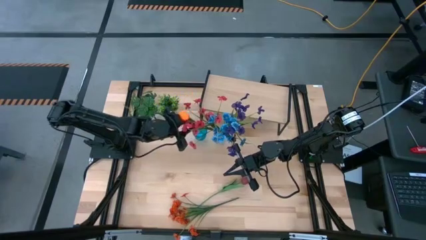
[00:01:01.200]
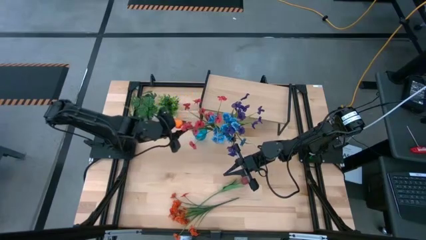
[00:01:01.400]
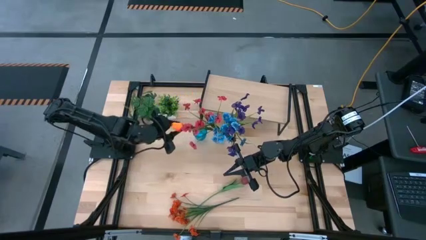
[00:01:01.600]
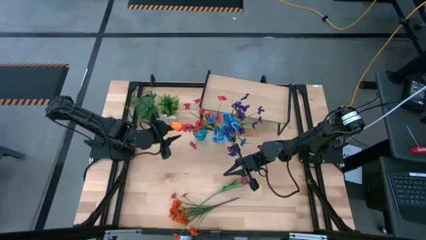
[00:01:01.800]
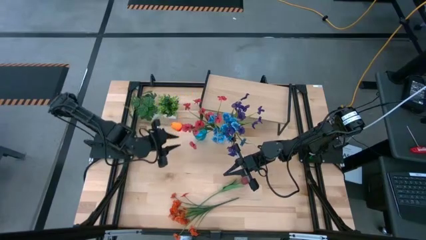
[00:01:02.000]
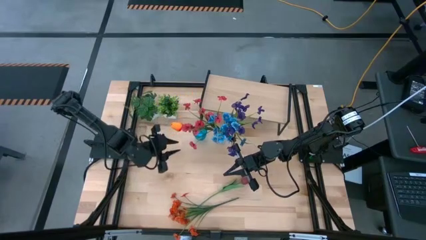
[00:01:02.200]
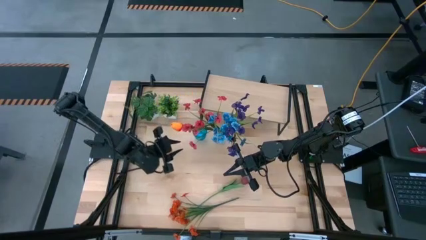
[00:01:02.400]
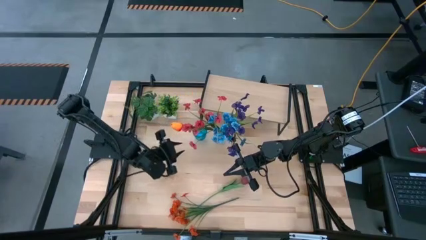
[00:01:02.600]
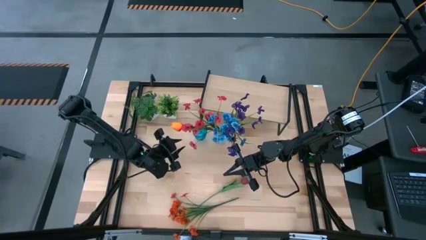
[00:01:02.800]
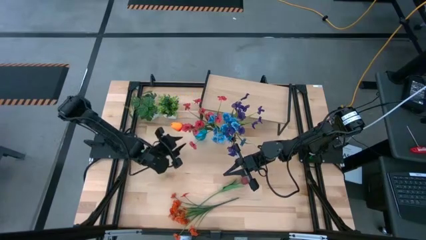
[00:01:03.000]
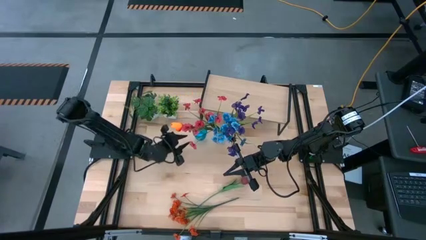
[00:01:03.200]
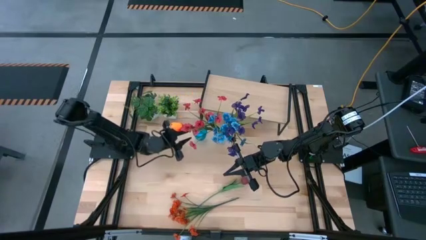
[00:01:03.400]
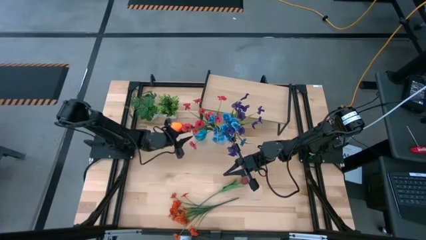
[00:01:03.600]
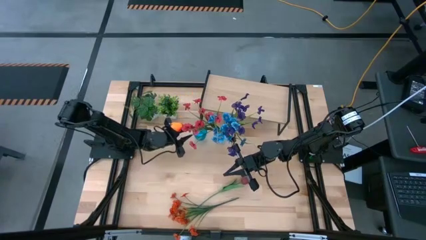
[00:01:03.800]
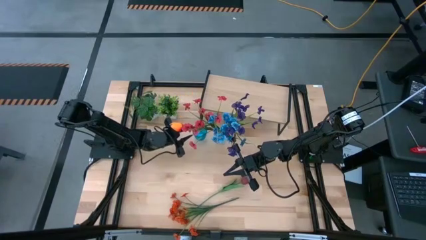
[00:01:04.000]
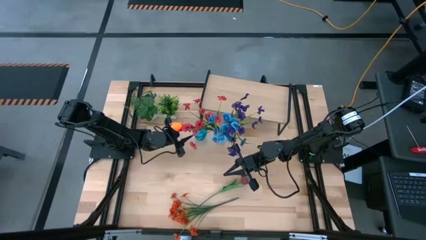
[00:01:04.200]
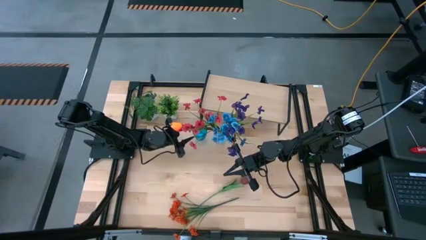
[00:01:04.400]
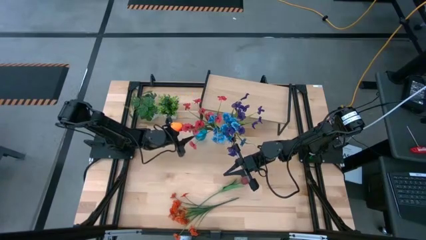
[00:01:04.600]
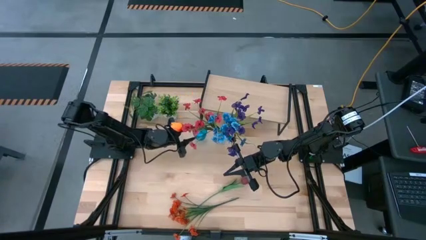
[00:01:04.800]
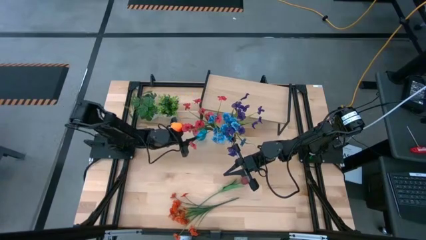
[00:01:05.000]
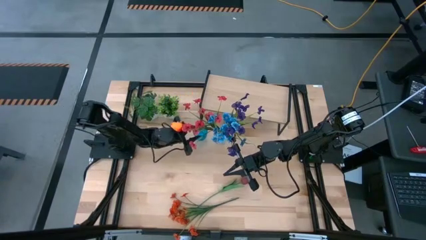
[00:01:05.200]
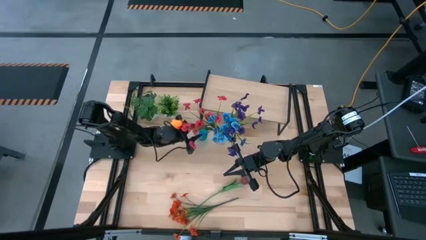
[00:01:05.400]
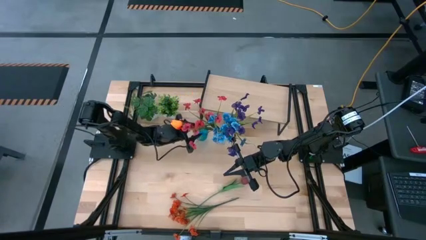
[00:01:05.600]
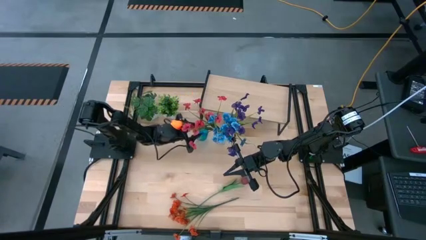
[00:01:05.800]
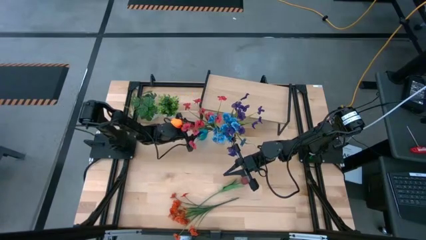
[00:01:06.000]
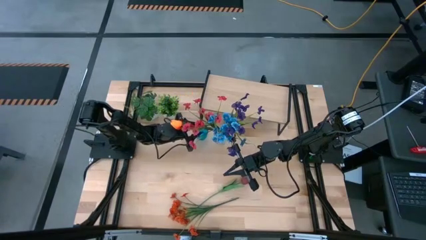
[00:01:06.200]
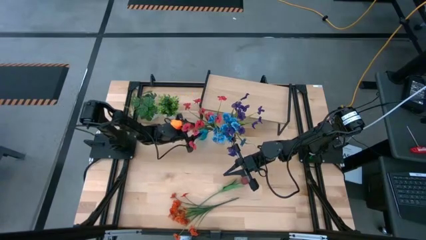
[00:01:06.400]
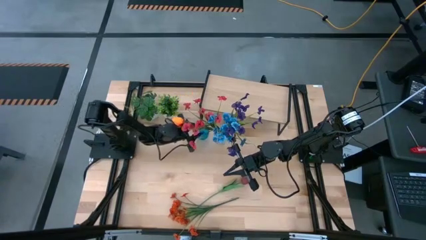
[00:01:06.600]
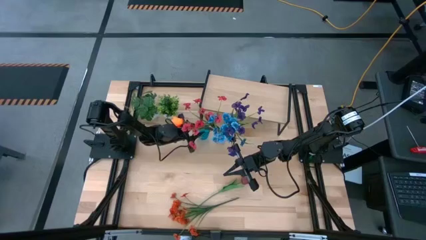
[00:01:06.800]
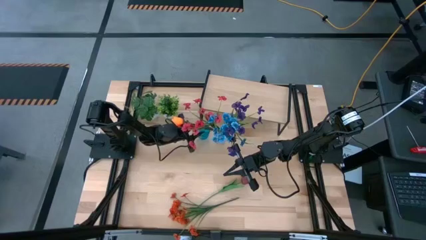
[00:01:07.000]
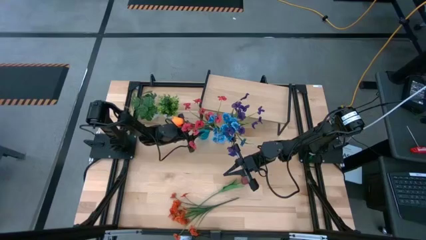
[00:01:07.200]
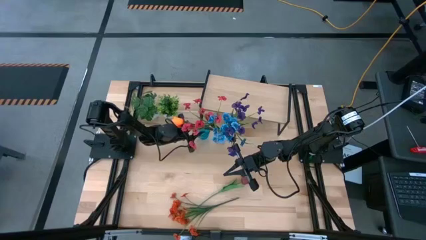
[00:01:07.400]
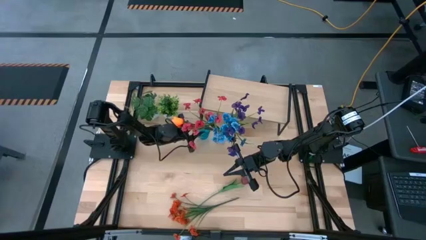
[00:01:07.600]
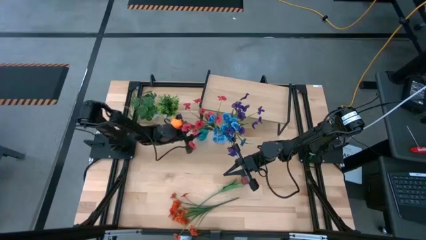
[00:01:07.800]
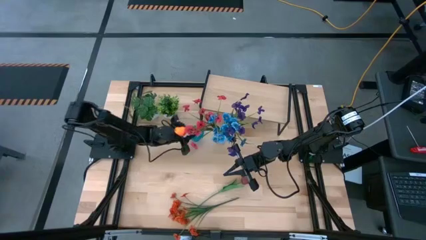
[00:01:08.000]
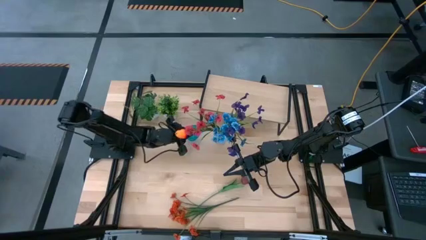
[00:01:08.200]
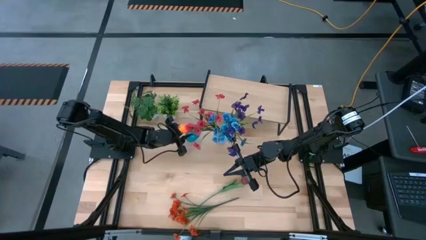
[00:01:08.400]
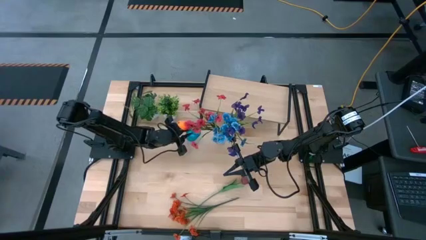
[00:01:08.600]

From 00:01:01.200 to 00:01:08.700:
Task: Pick and place flowers into a vace then onto a shelf
Adjust the blue vase on the table

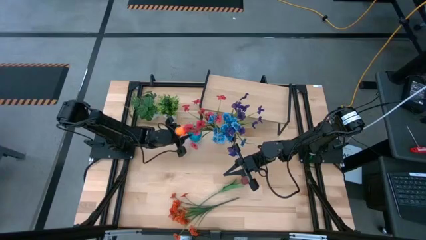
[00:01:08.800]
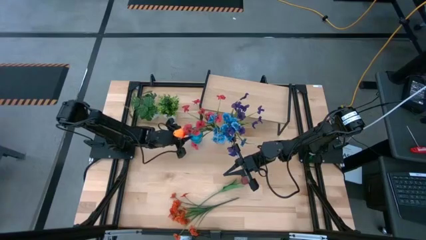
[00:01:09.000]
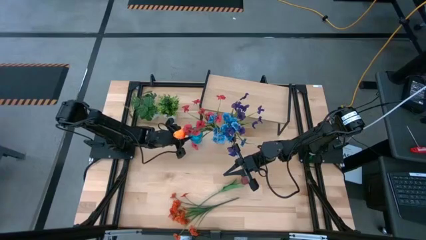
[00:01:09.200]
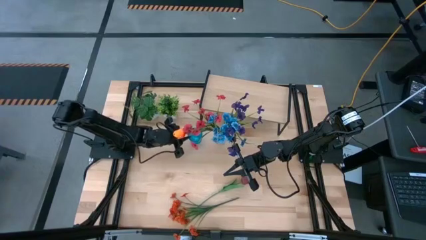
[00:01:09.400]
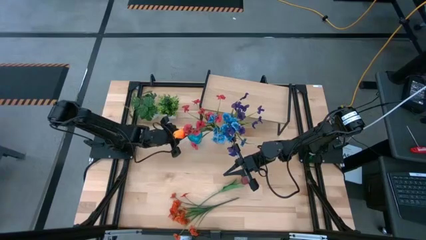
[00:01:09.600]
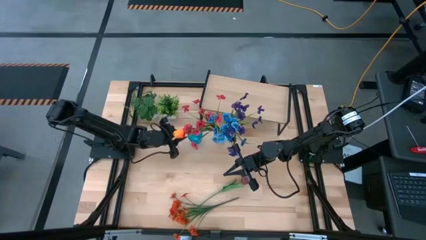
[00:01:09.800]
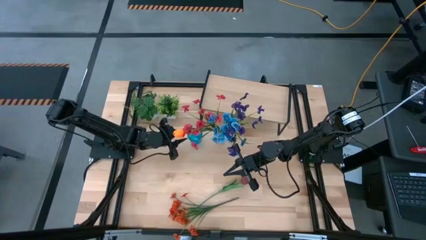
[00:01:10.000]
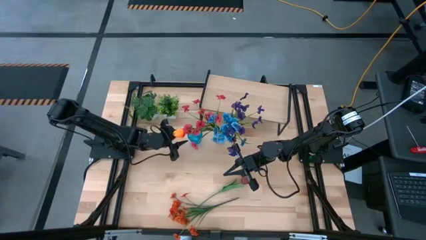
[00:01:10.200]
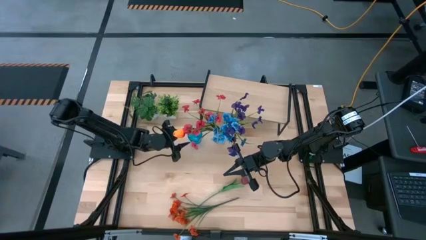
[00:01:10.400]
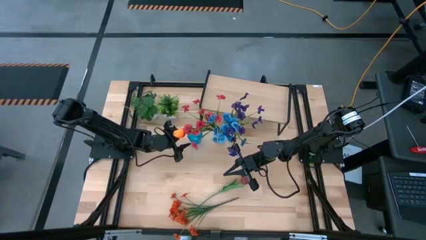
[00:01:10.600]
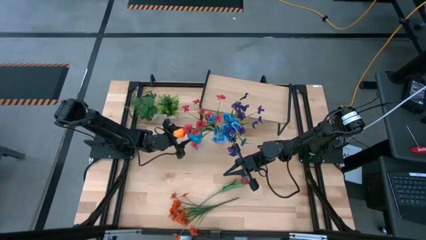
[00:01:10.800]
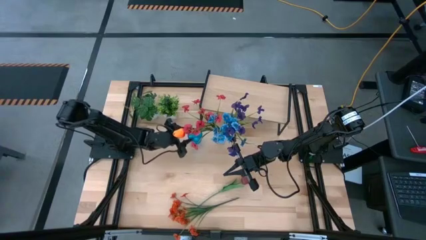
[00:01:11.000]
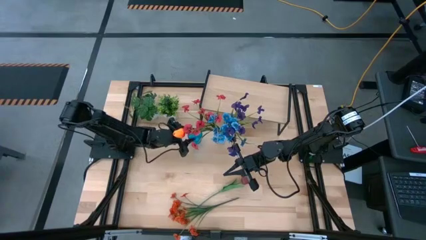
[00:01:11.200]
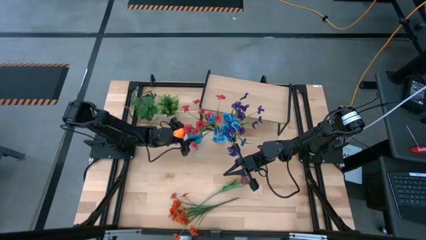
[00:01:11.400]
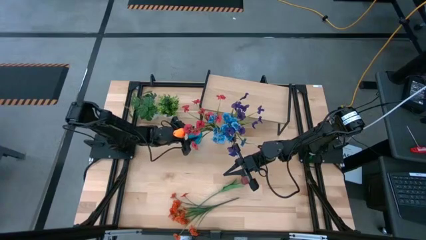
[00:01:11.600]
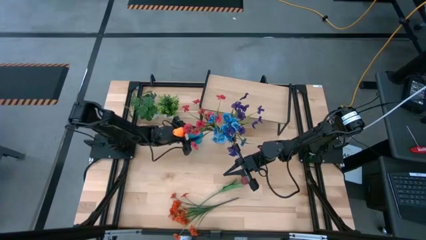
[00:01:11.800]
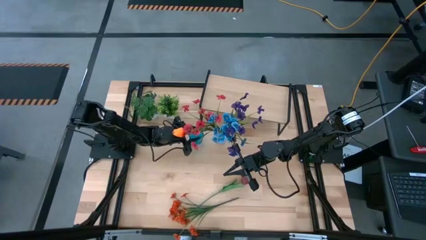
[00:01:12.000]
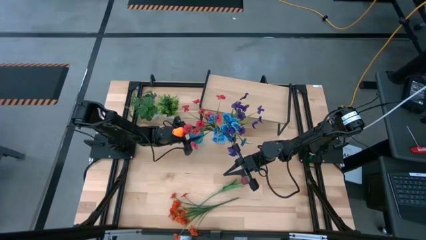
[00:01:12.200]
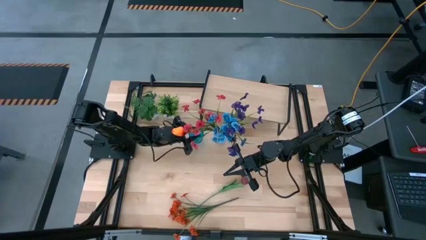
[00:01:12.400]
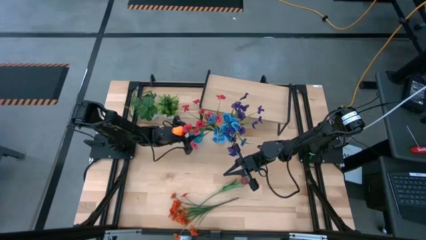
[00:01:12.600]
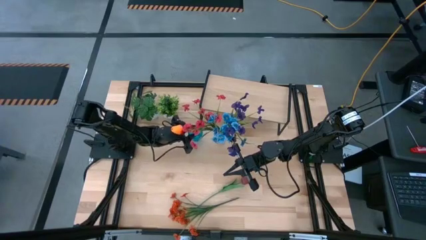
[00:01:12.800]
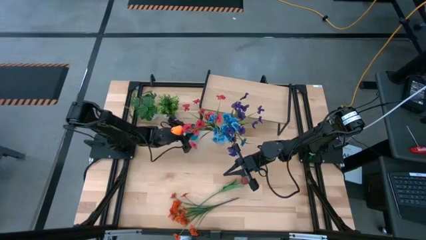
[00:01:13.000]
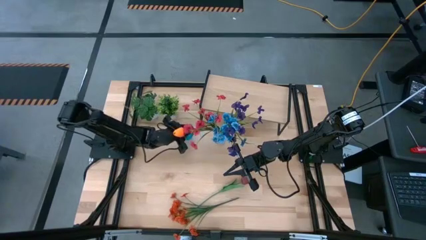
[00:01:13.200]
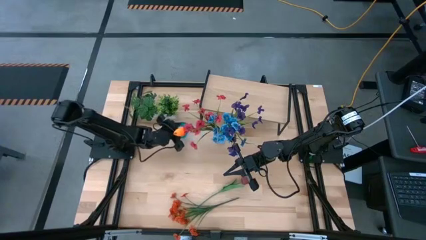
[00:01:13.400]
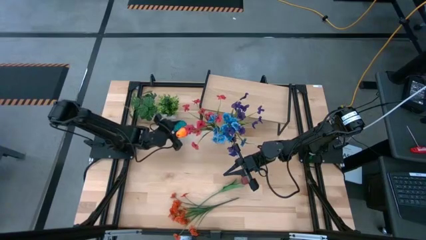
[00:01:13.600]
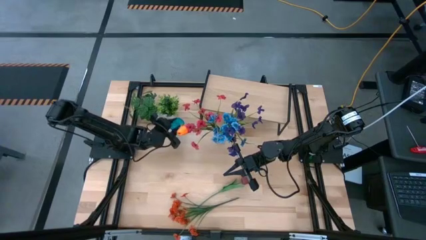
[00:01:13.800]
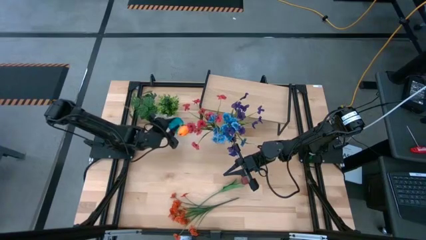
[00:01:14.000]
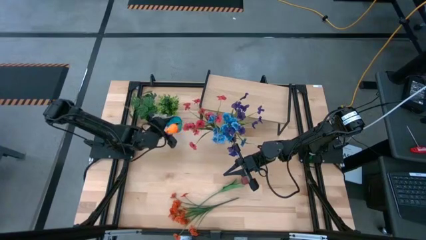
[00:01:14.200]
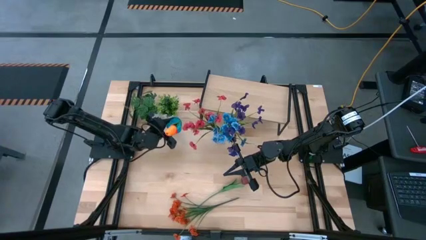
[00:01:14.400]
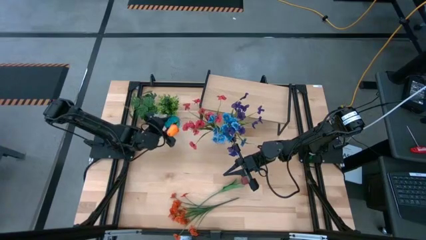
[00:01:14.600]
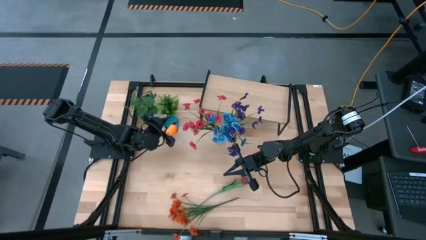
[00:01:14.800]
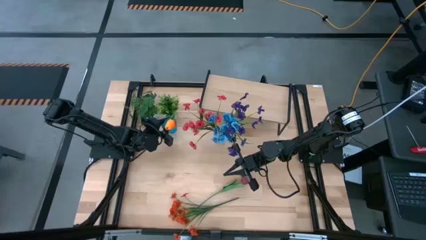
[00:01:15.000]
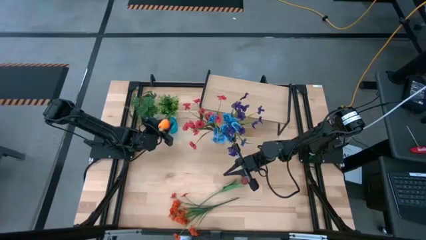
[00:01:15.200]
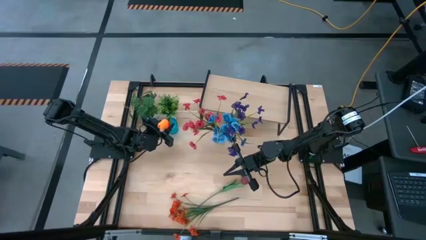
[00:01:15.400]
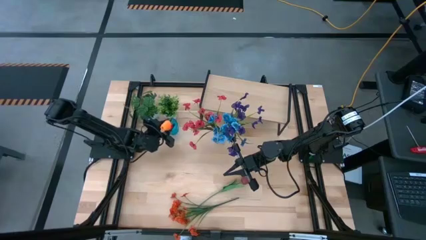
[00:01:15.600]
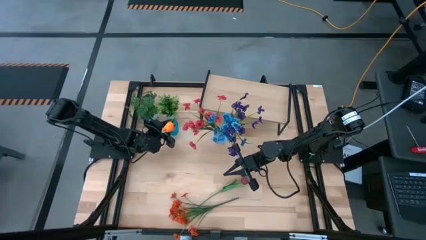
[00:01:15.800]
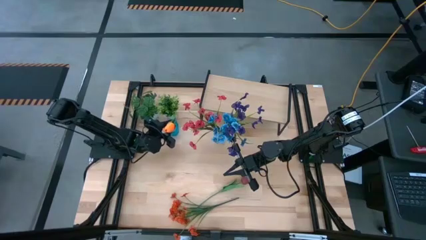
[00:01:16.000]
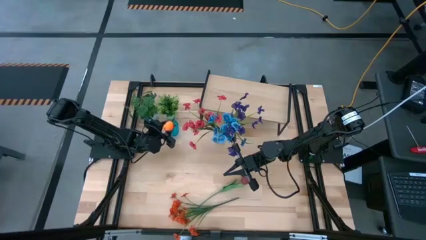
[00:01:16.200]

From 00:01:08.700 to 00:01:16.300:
Adjust the blue vase on the table
